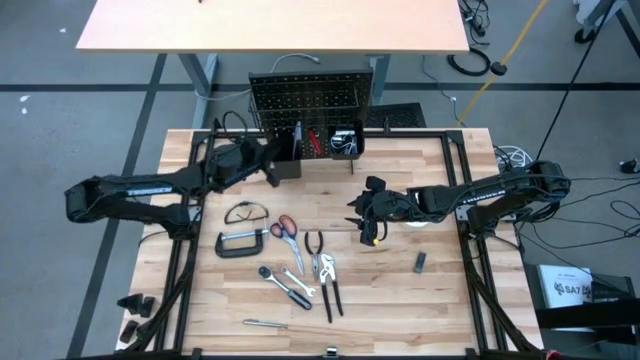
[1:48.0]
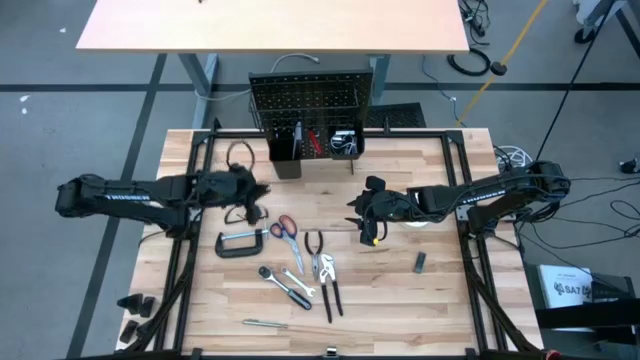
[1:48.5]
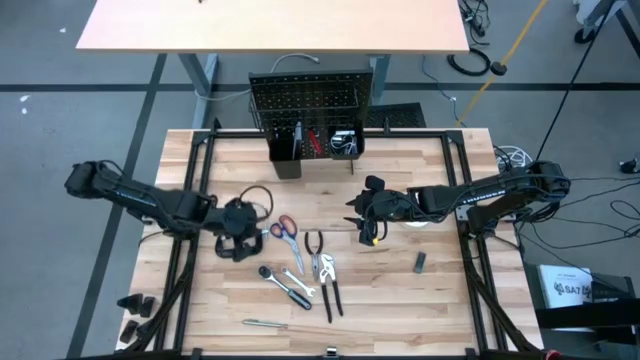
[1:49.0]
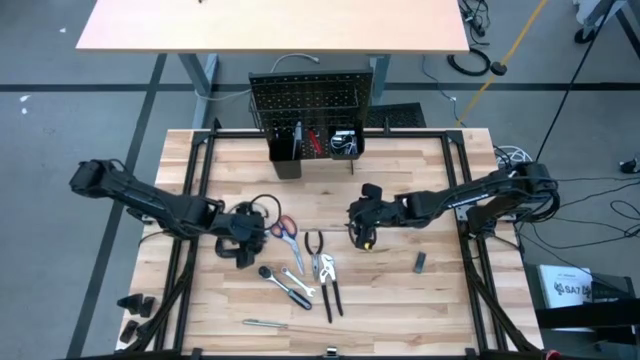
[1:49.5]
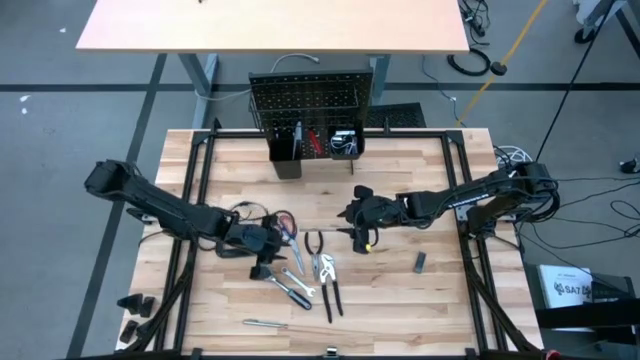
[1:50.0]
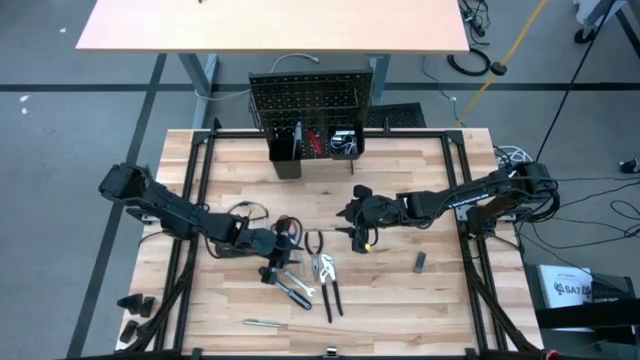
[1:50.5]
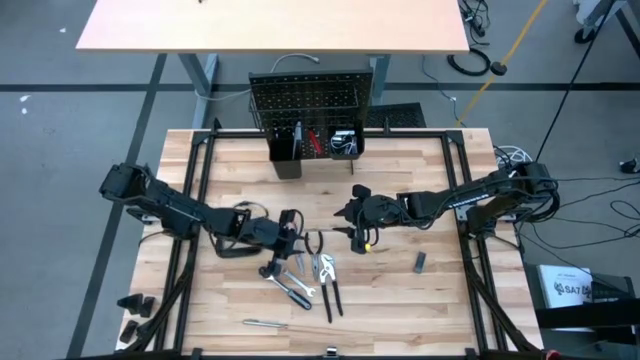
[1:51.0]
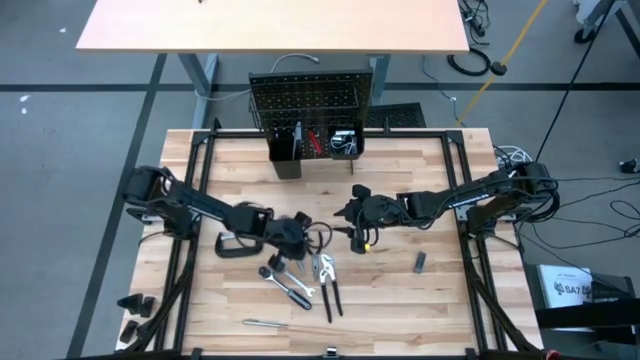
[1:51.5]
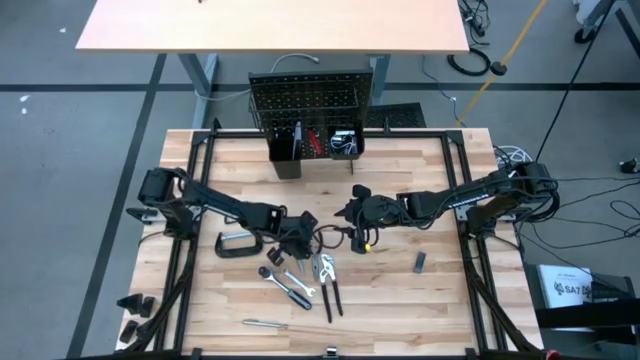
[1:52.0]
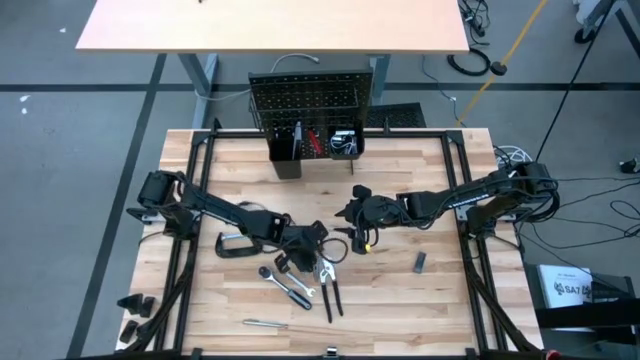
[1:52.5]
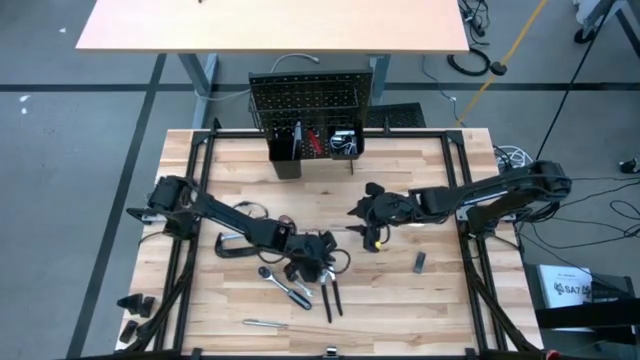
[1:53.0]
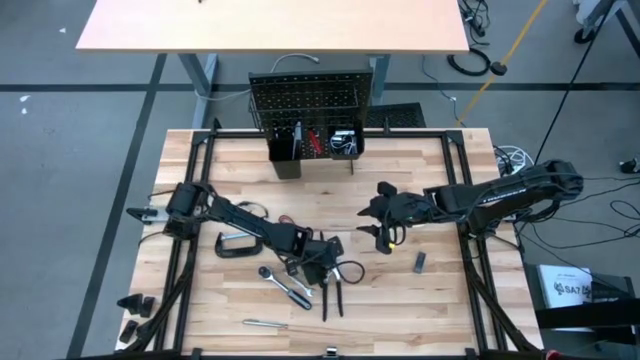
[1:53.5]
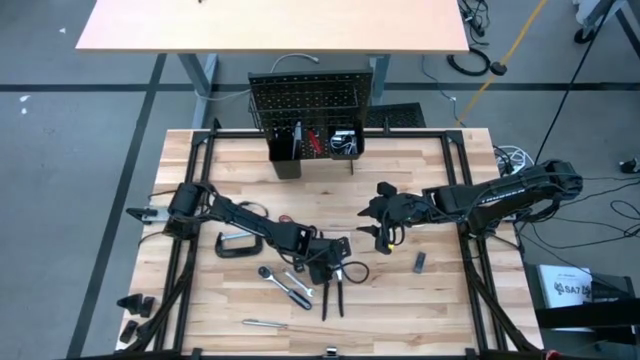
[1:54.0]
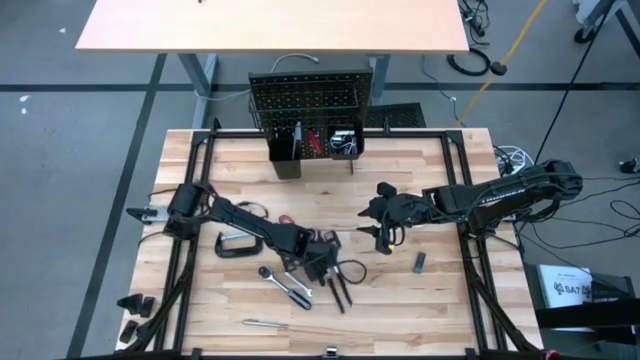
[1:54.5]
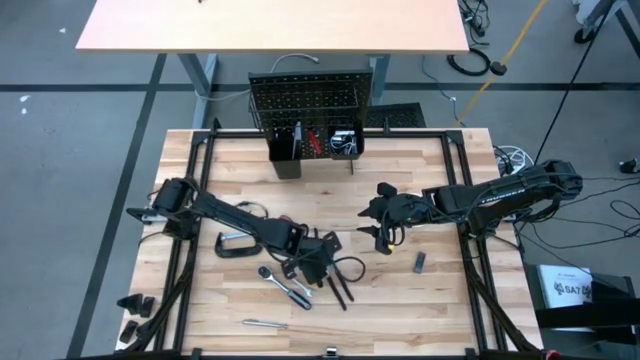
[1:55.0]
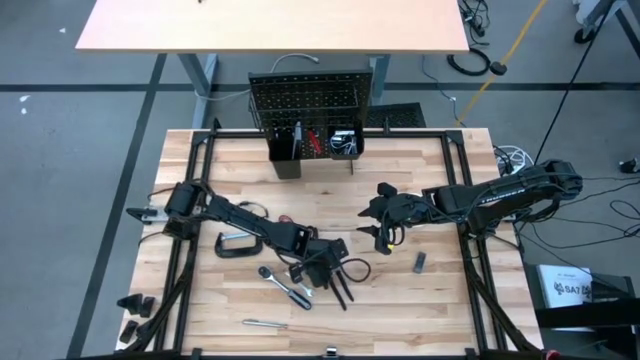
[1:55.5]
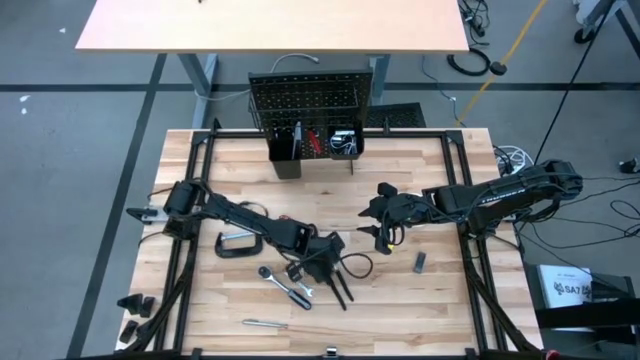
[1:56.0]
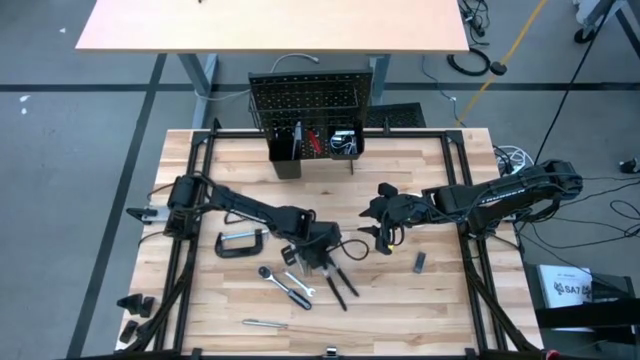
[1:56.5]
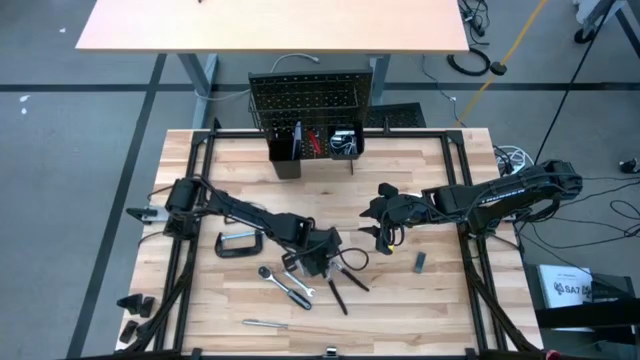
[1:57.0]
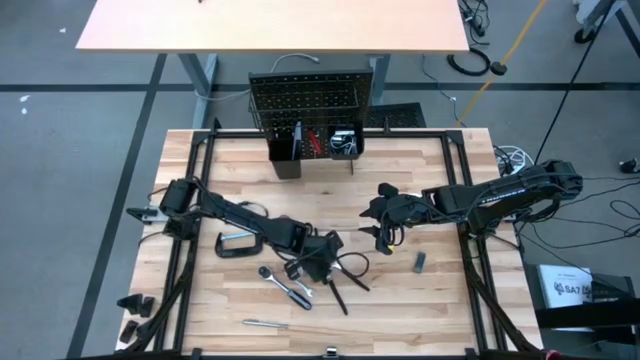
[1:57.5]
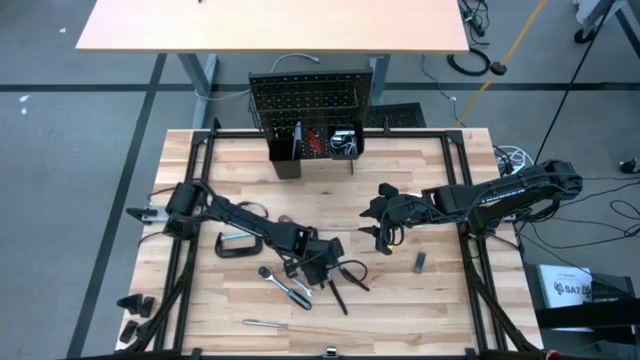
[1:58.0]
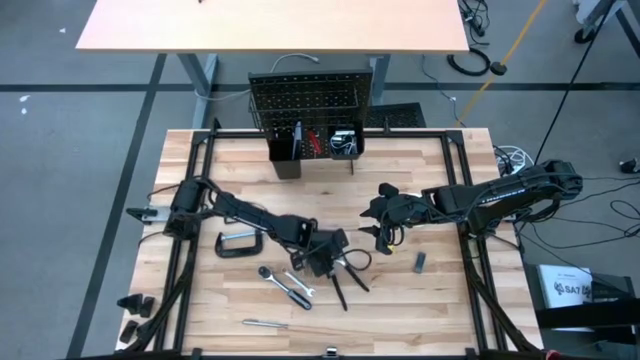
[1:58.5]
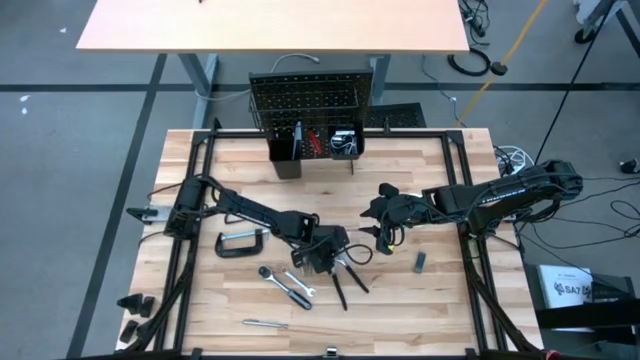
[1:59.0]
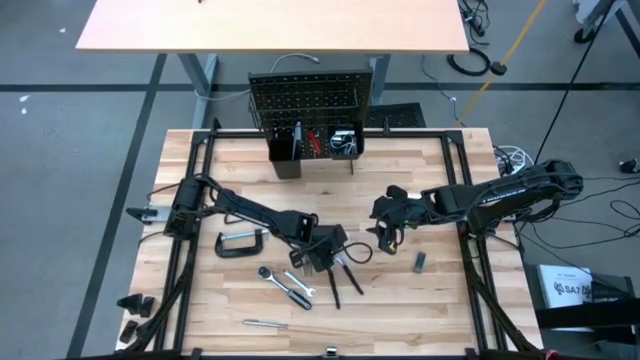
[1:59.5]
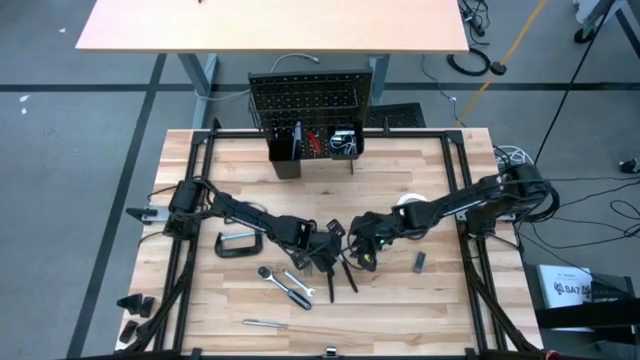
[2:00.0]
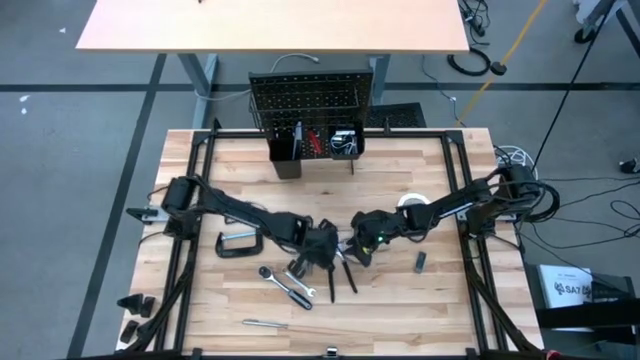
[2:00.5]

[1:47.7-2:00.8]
Task: Hang tools onto peg board
Put the slip joint pliers on the left black bin on the peg board

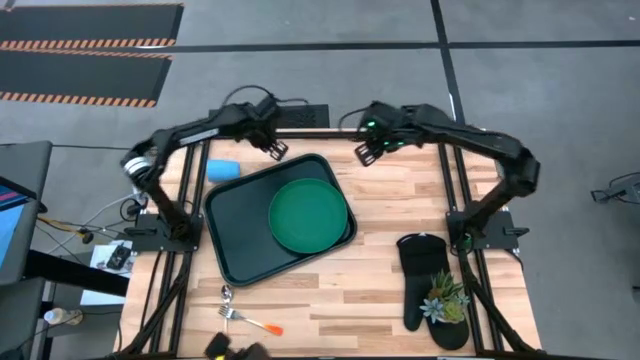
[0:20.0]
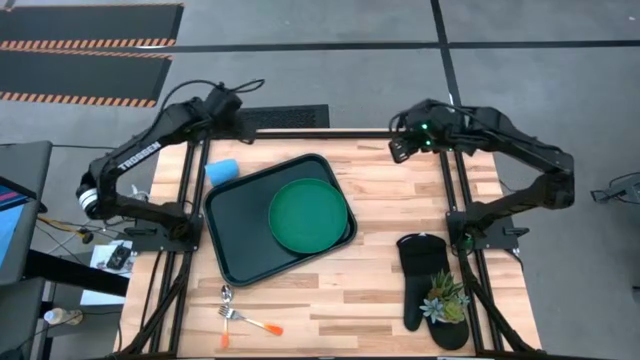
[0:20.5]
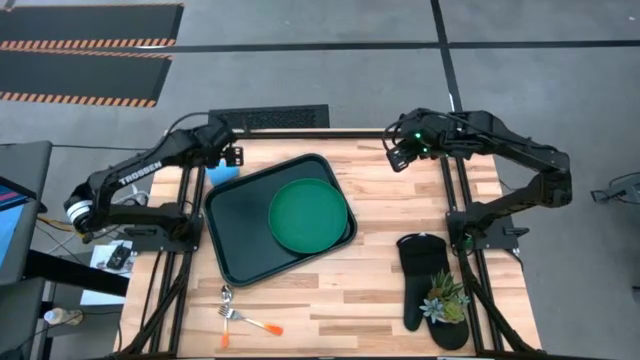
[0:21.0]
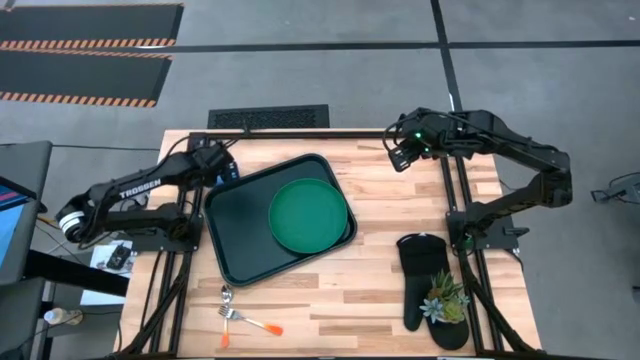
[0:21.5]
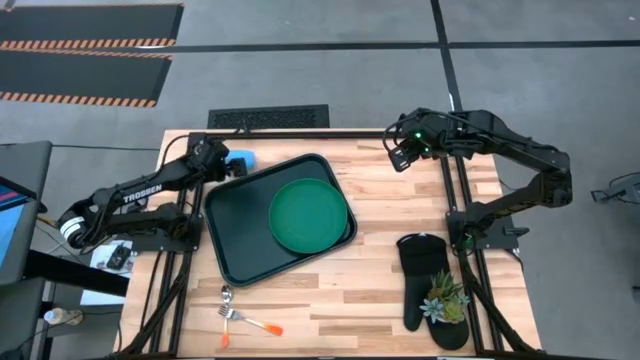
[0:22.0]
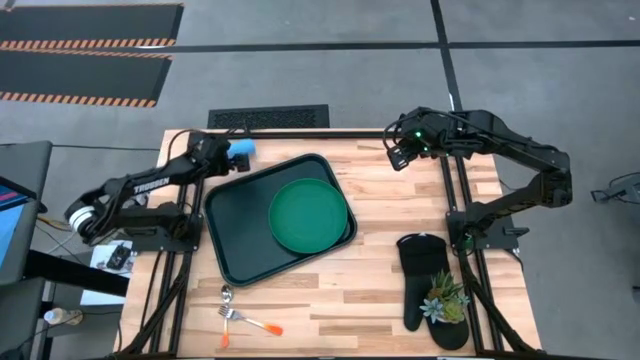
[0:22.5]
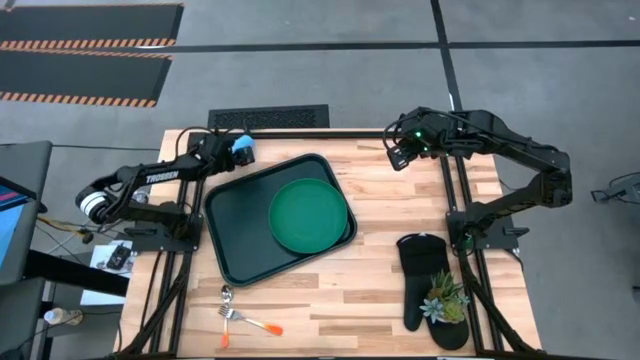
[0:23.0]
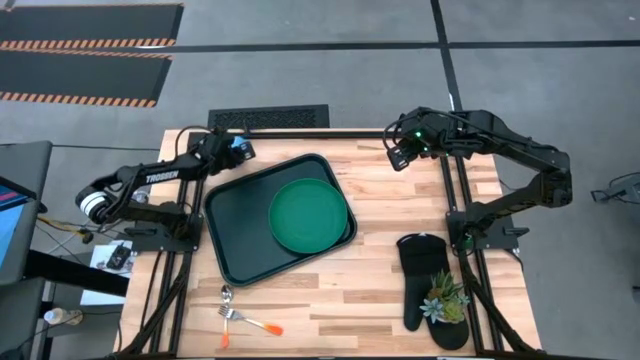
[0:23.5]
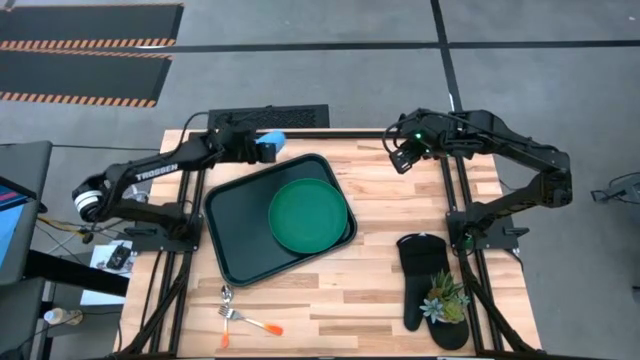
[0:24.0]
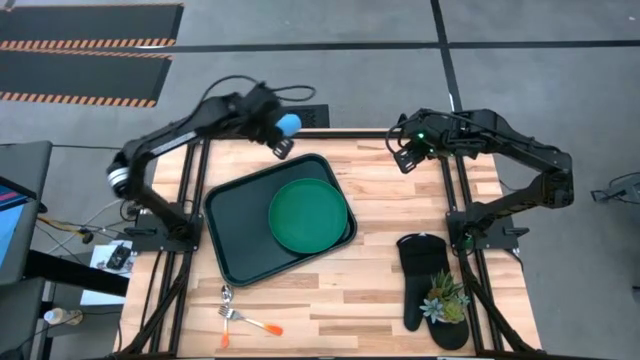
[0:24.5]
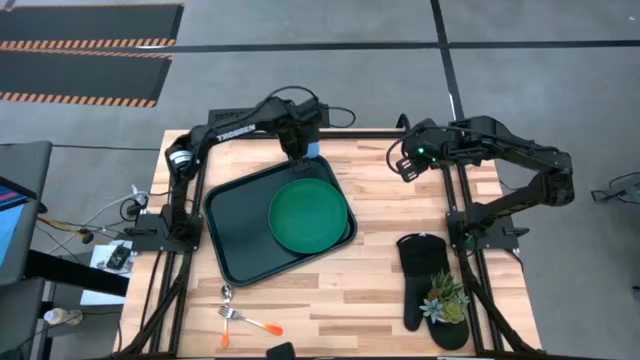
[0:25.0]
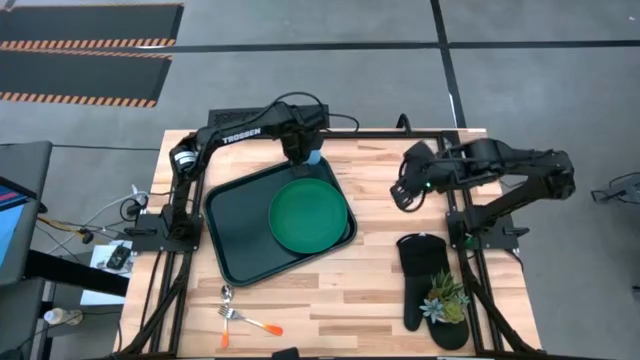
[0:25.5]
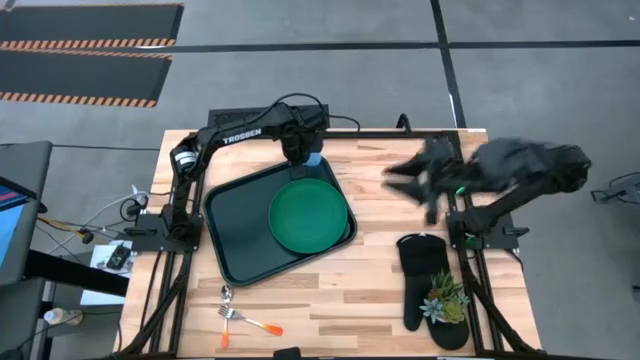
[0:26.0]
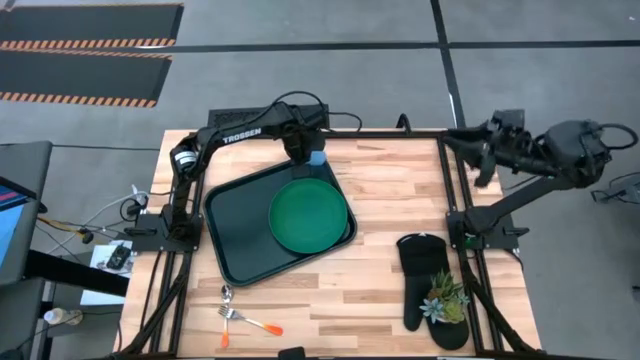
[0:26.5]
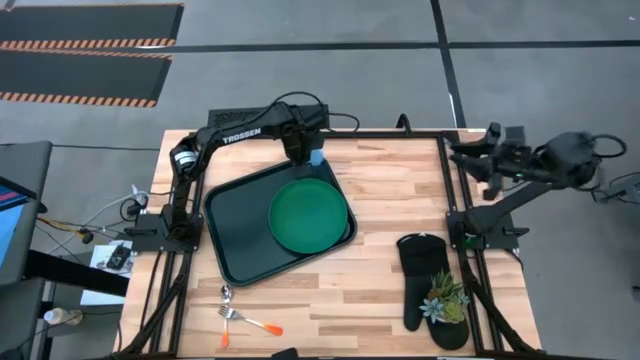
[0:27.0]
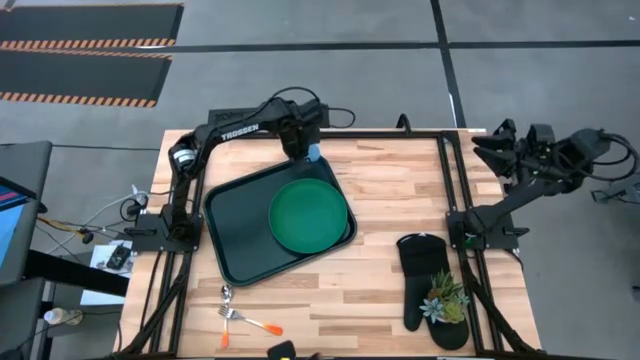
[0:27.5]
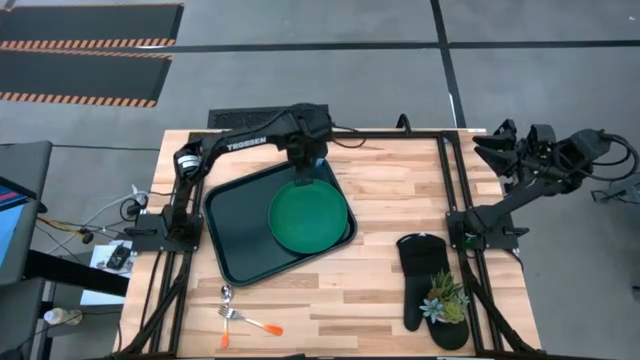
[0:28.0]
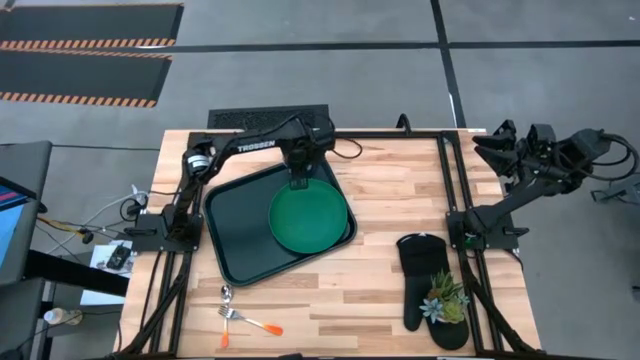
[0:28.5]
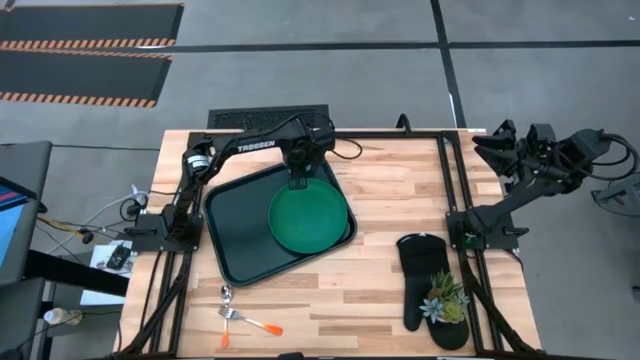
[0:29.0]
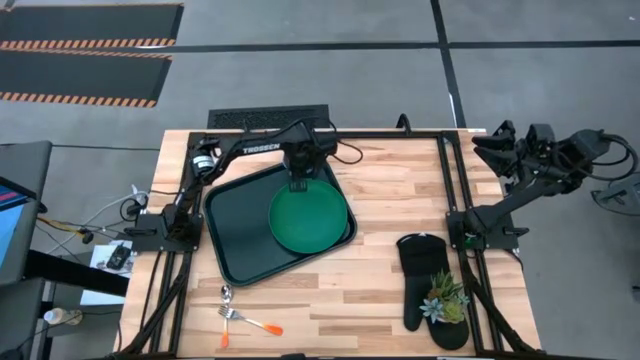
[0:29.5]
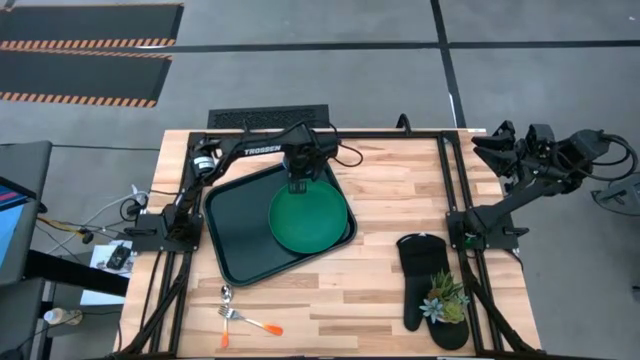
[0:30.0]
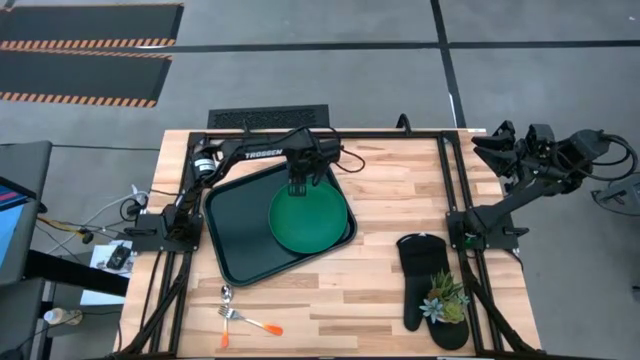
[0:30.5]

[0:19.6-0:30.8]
Task: Pick and place plate/cup/fork/spoon on tray
Put the blue cup on the top right of the black tray
